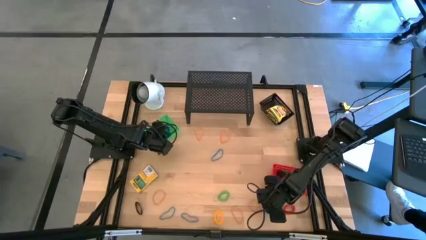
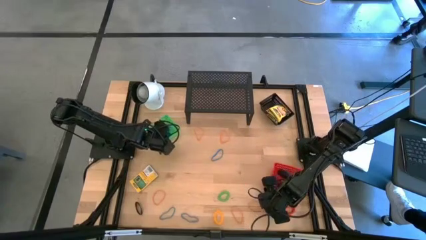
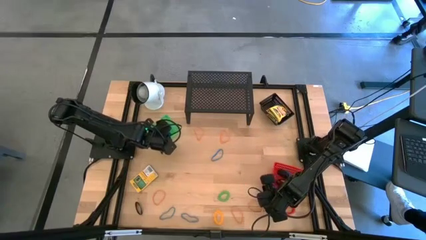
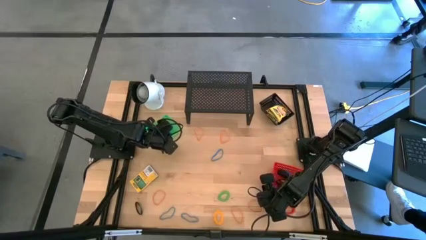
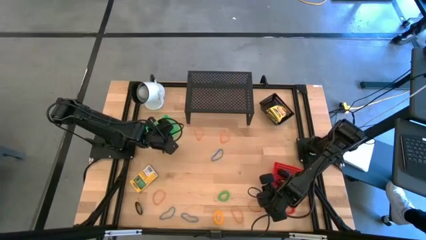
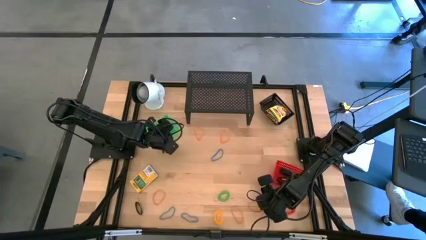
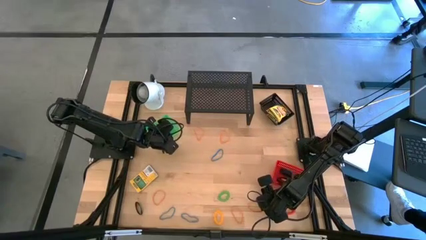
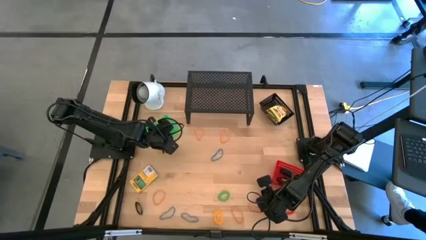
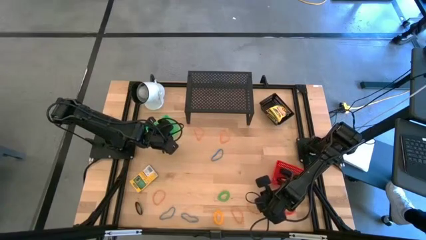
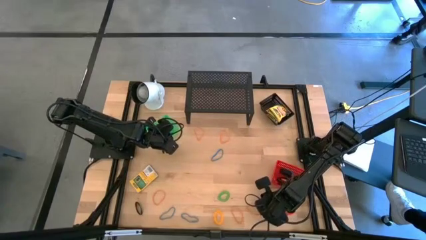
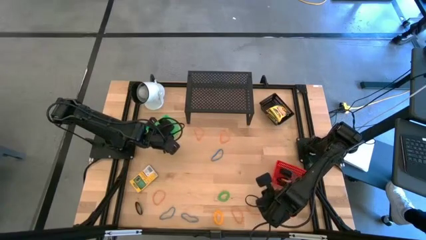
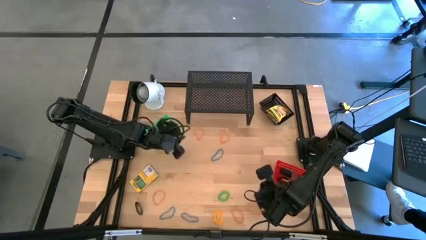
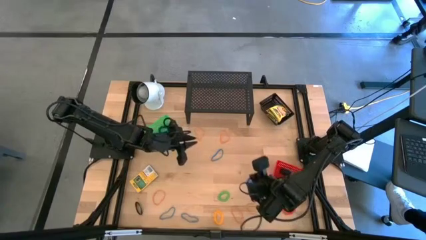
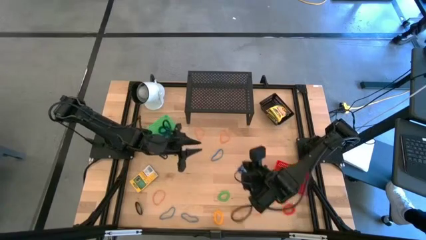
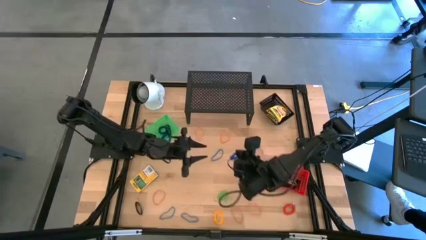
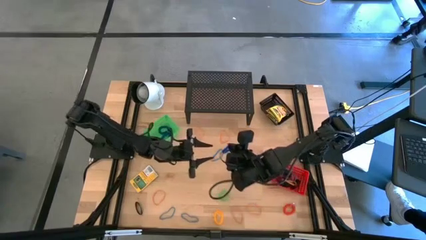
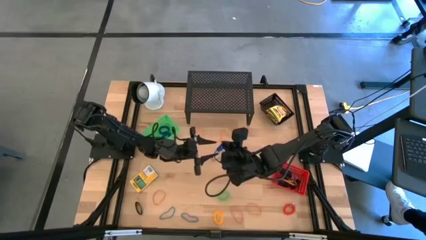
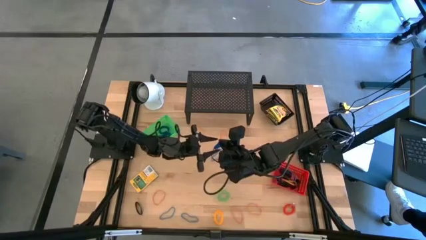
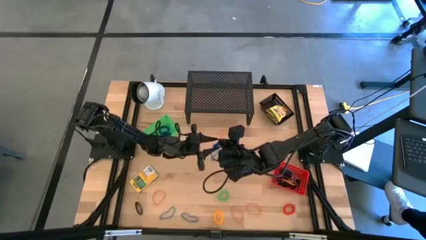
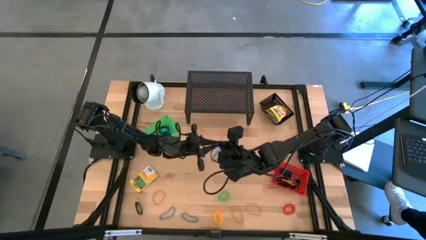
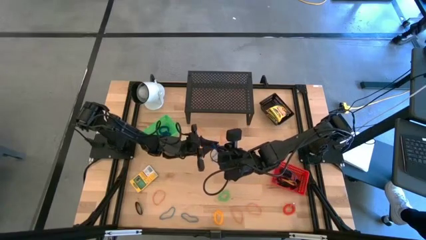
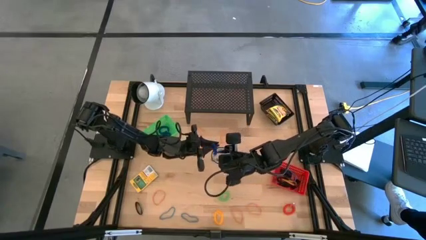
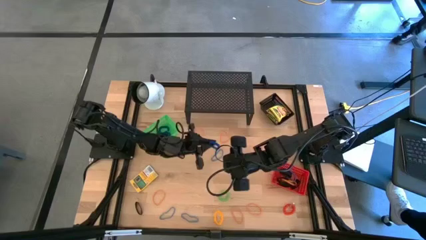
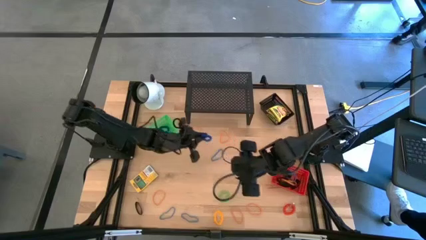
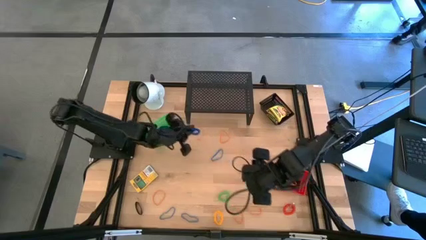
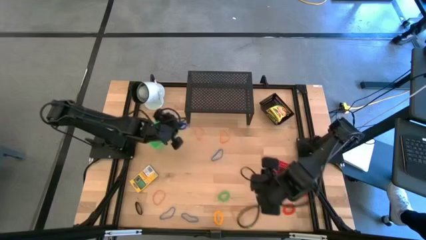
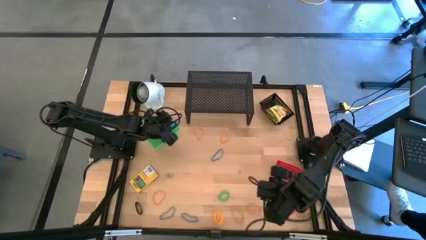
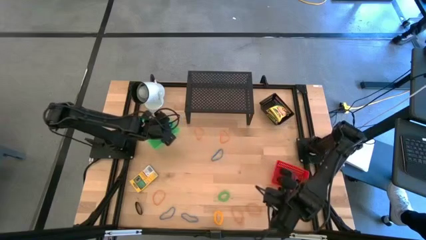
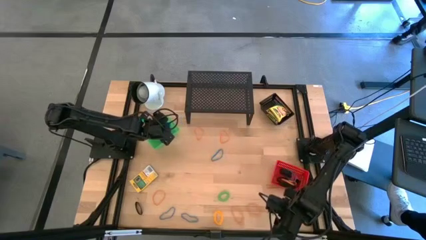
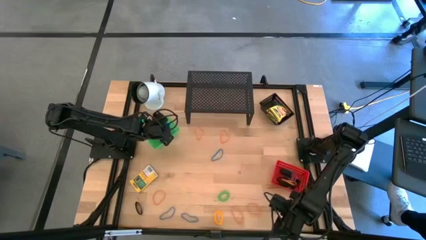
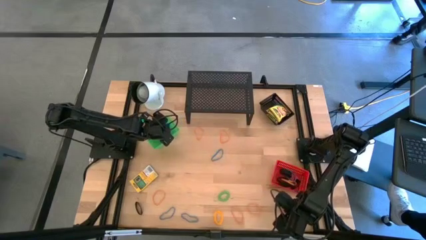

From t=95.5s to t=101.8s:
Task: Pick & Place Office Desk Supplies
Put the blue spring keychain into the green bin

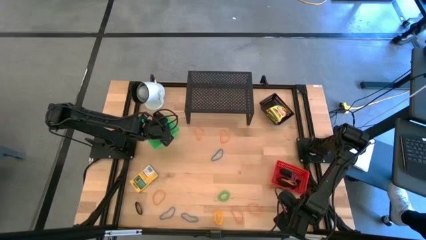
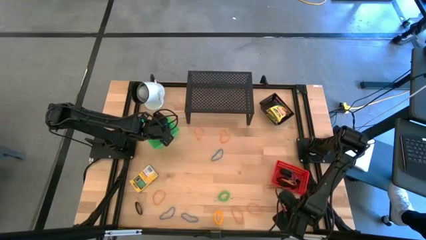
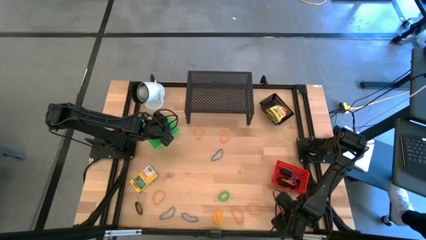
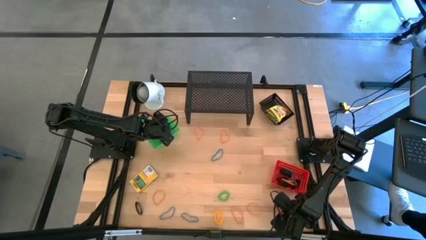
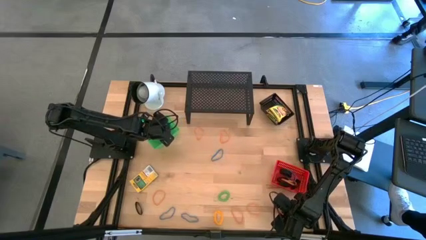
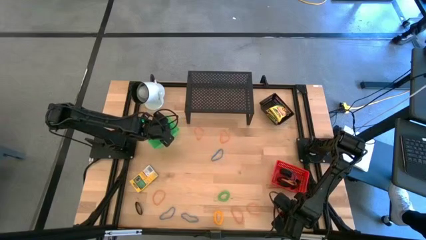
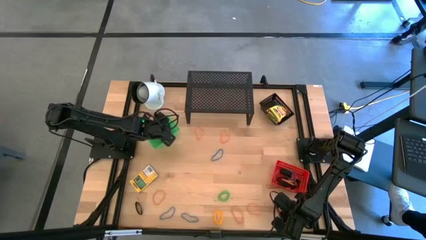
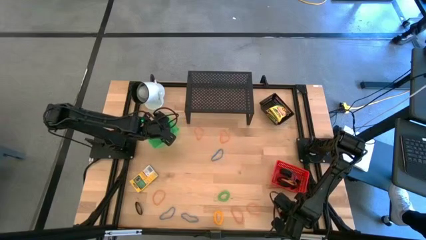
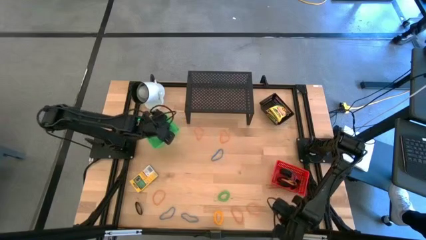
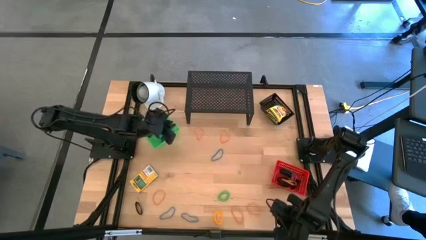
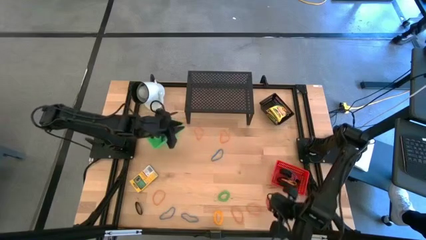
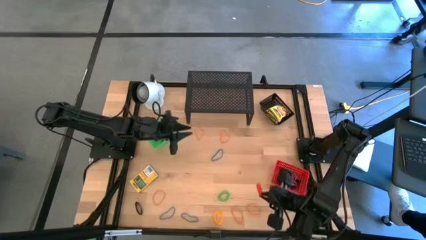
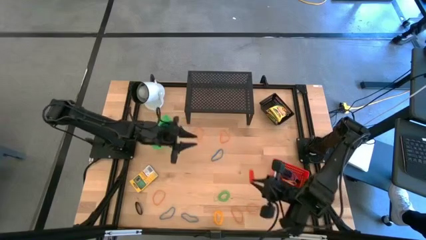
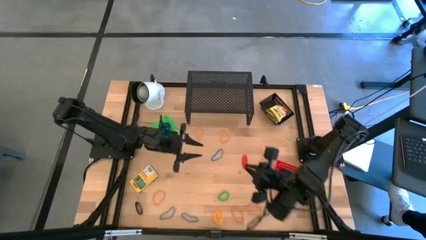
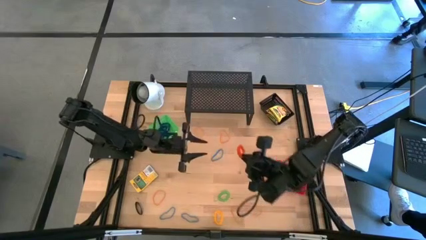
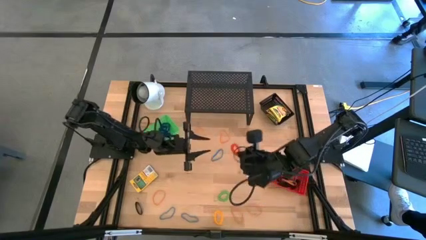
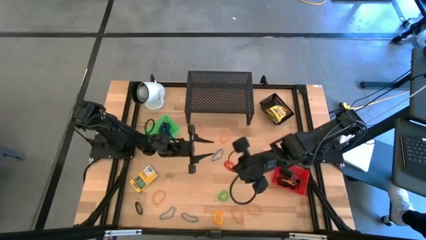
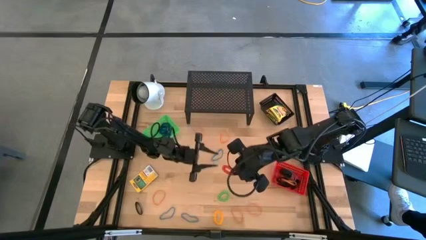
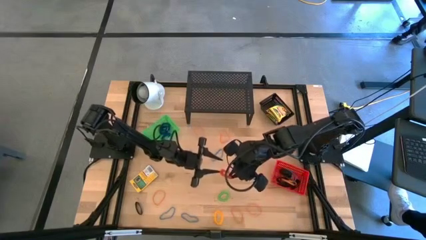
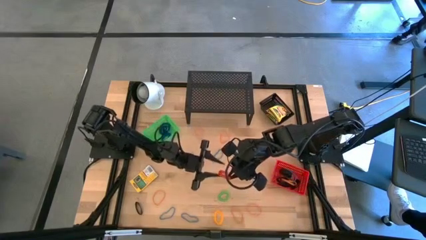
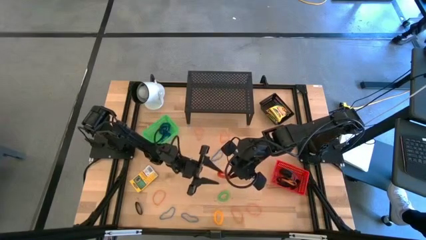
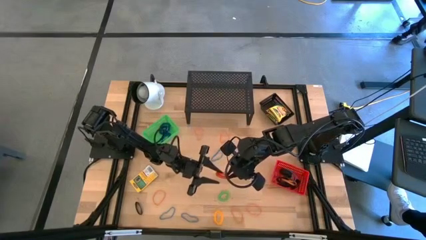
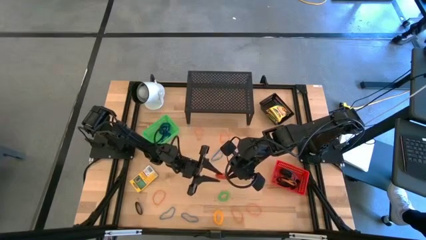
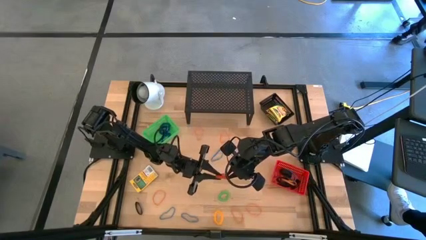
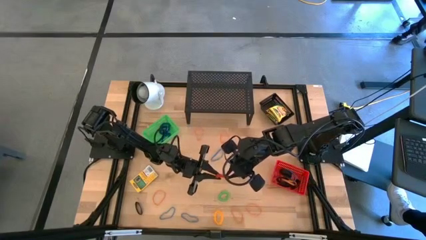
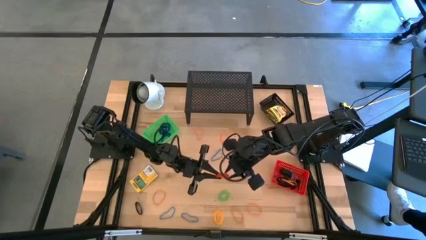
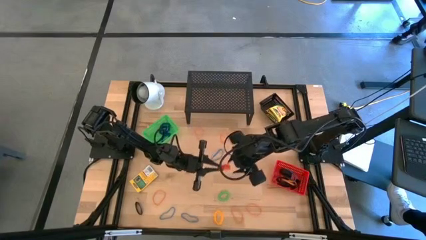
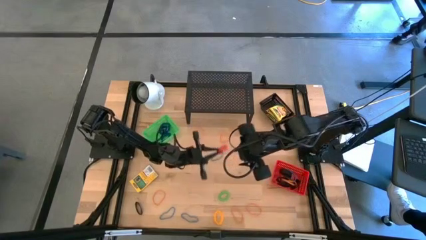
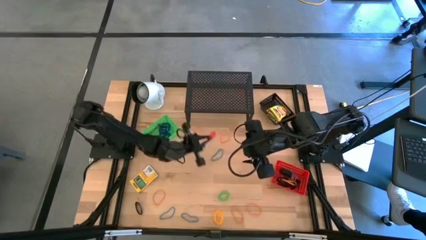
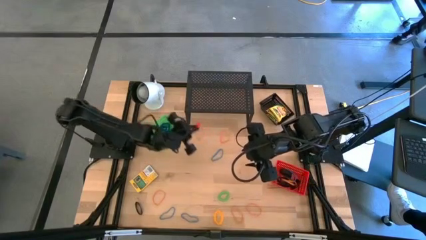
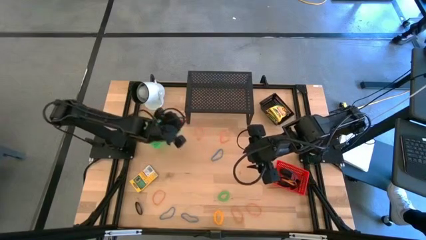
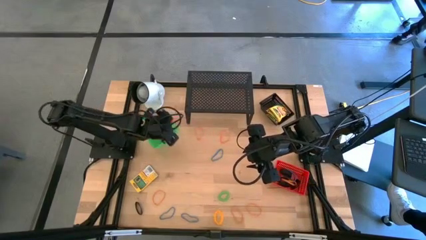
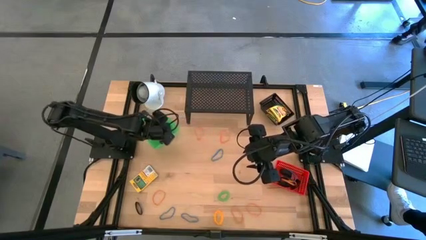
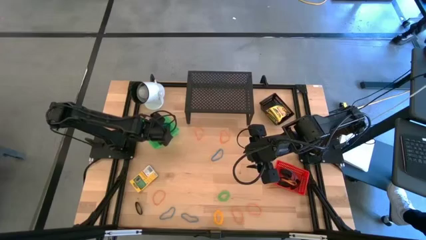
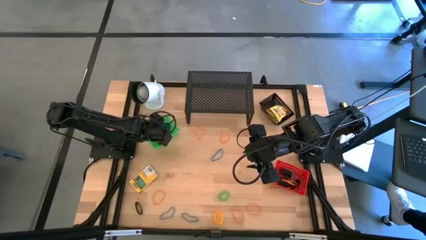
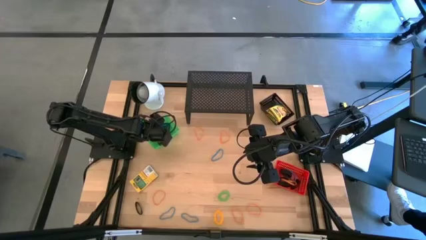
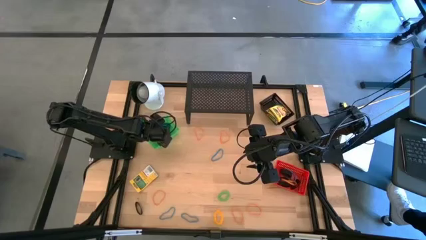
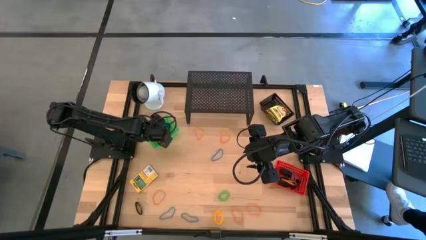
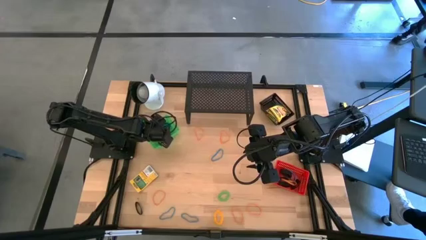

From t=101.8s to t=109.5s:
Put the orange spring keychain into the green bin

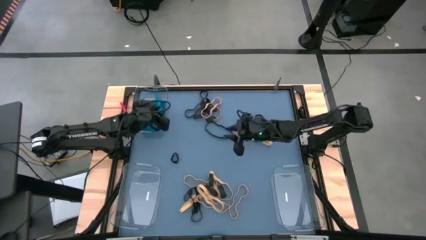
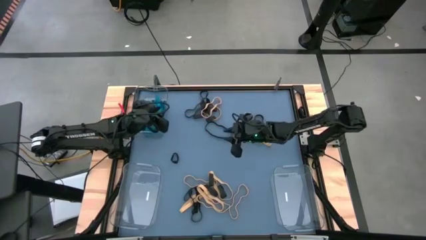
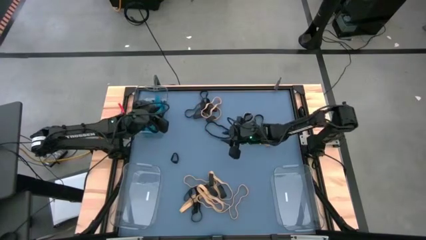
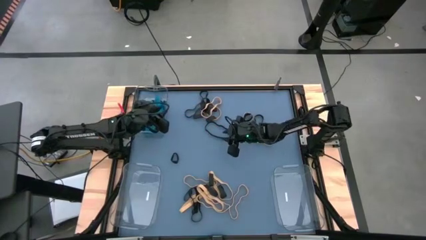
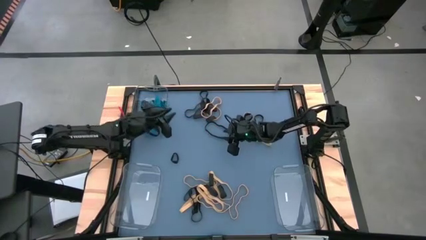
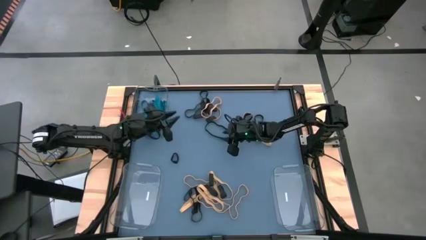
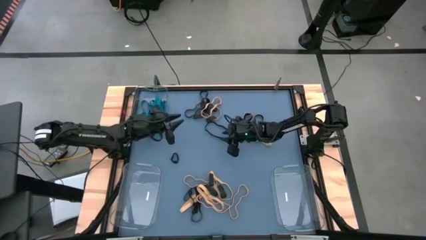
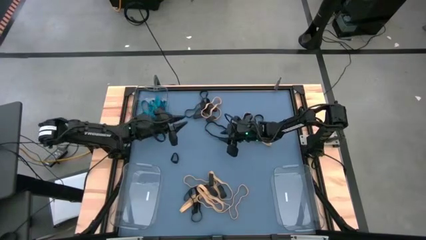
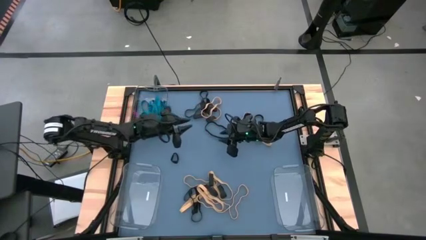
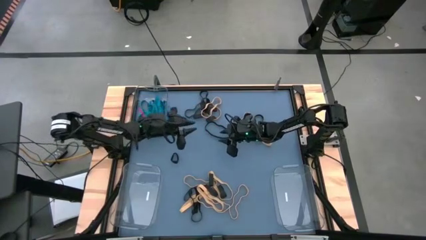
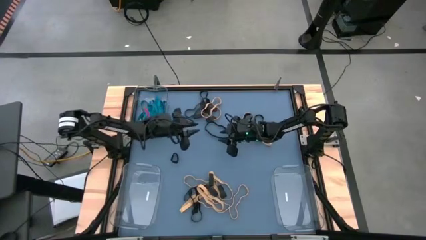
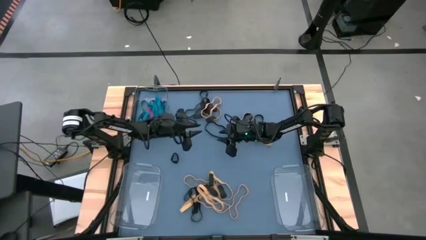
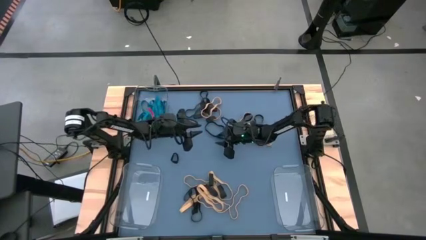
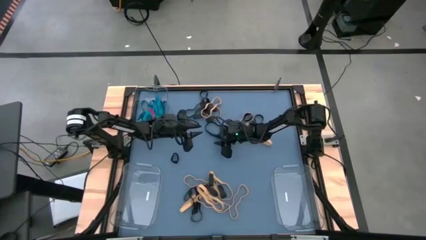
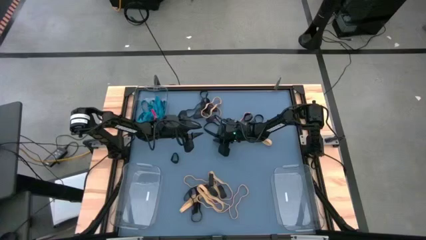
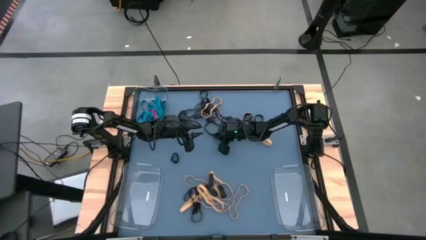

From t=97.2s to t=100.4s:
Task: Sort rubber bands into baskets
Put the black rubber band into the bottom left transparent bin
